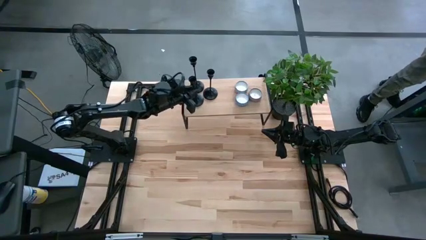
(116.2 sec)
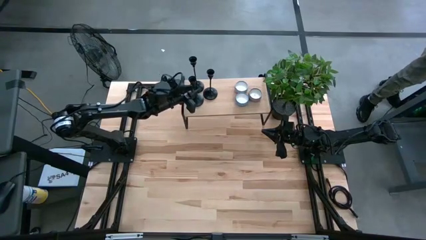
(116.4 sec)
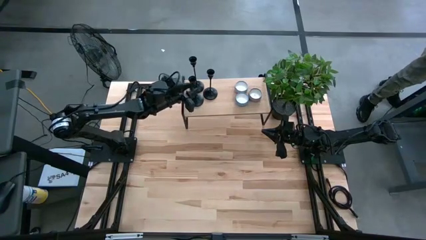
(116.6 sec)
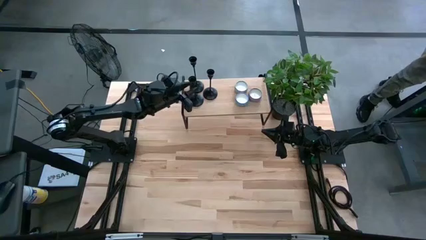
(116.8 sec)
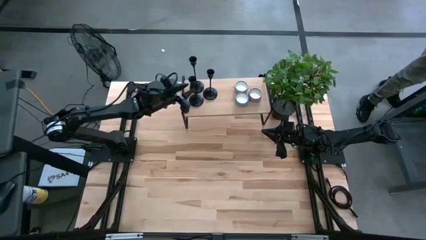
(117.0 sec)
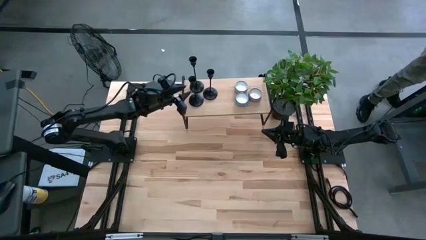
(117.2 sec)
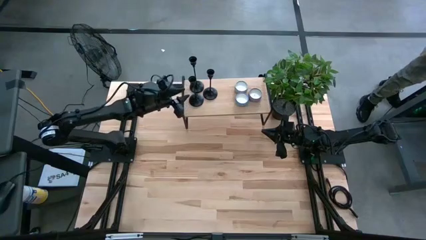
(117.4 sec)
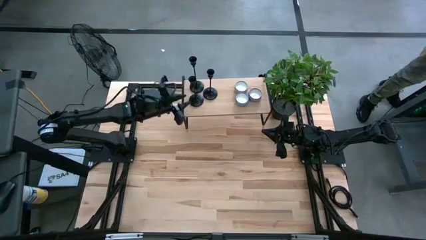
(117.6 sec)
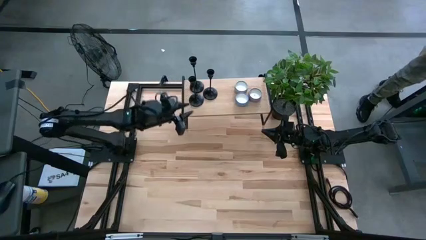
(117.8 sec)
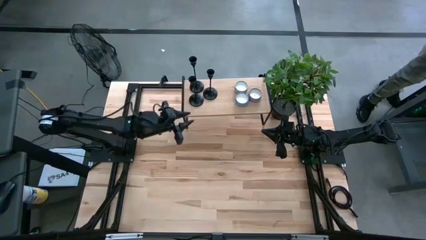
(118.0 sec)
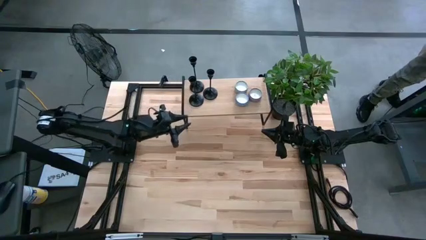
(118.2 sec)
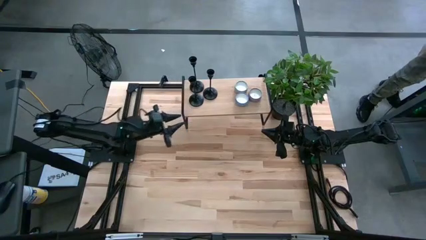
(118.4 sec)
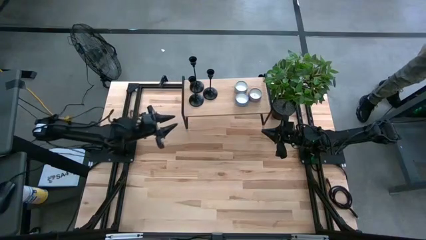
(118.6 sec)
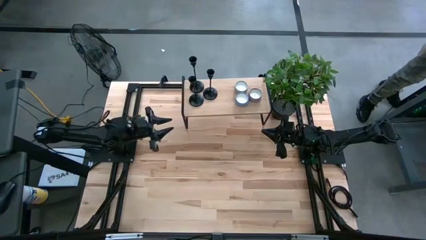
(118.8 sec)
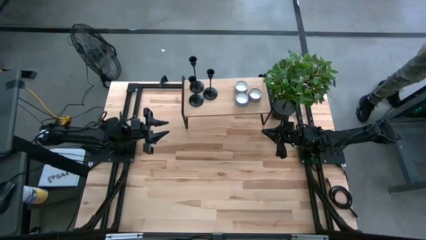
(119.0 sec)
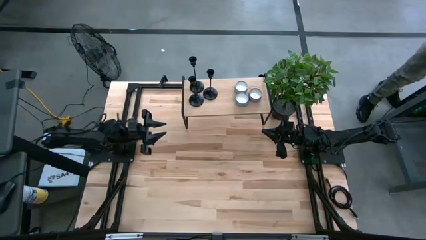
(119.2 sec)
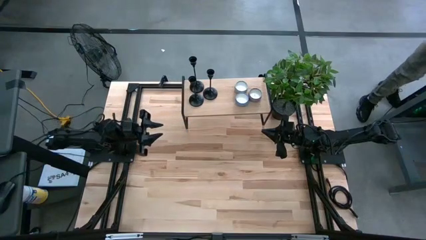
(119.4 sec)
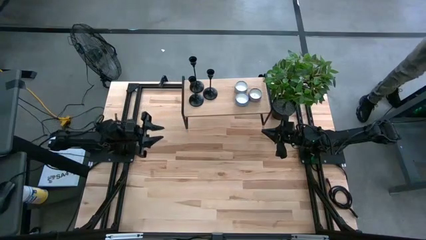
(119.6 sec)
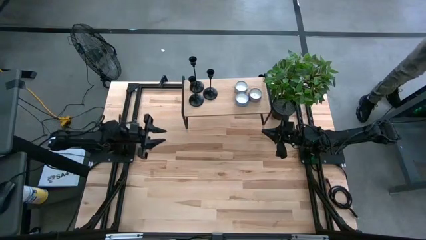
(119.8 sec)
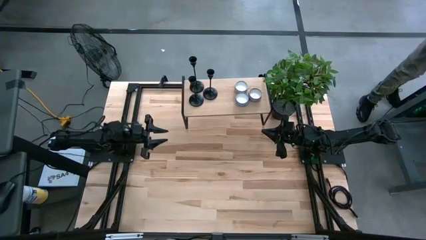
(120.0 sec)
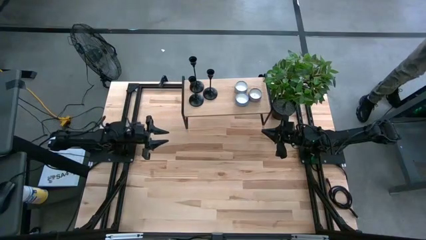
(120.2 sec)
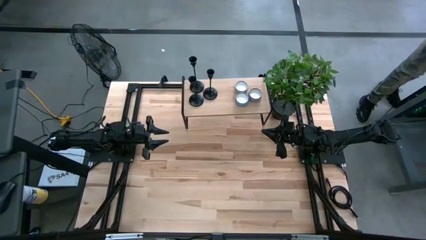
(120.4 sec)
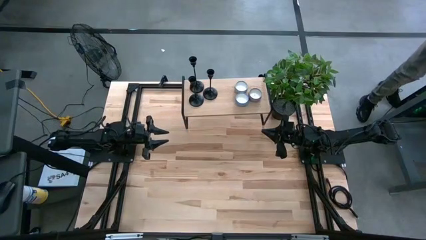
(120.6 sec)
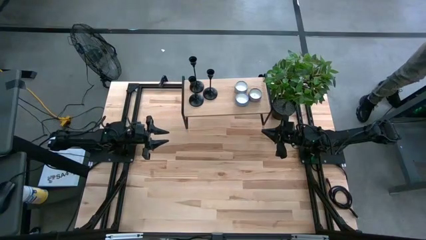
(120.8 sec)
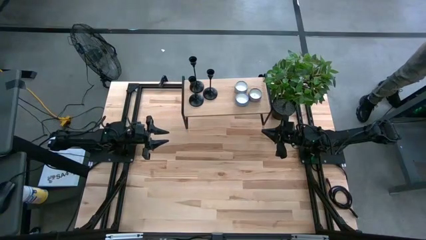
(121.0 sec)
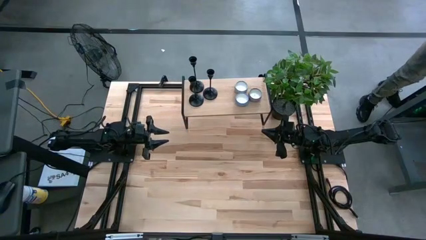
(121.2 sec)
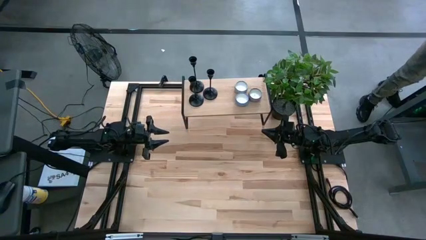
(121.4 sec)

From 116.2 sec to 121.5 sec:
Task: Pick & Place candle stick holders
Return to Home Position

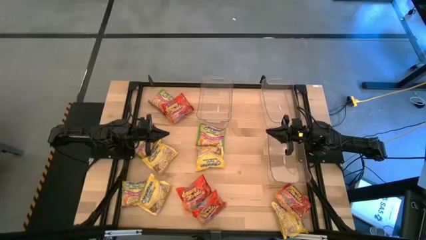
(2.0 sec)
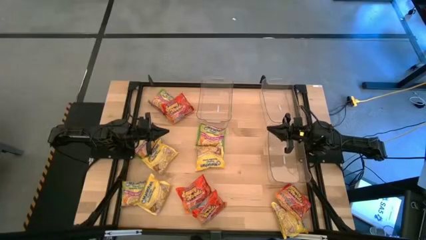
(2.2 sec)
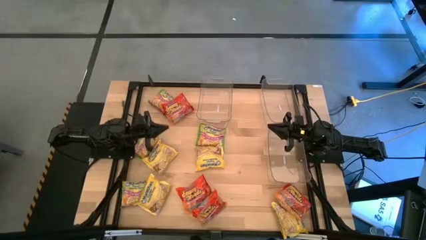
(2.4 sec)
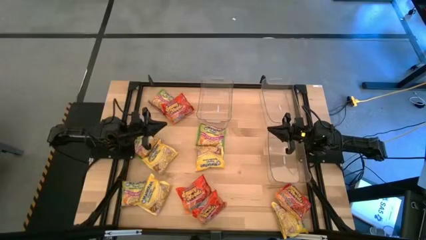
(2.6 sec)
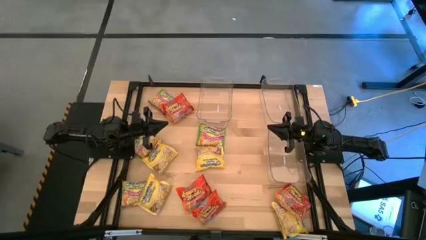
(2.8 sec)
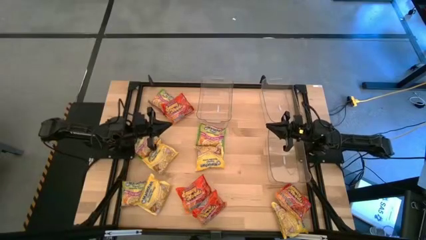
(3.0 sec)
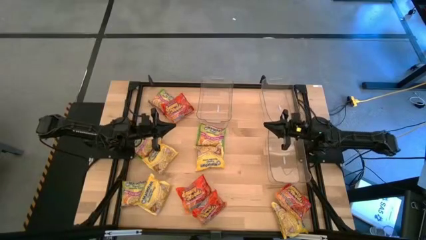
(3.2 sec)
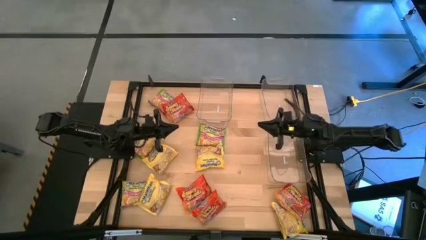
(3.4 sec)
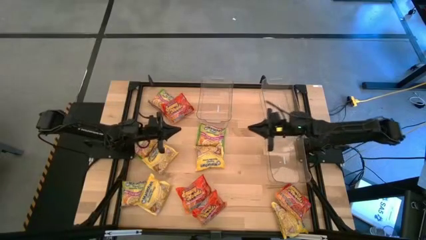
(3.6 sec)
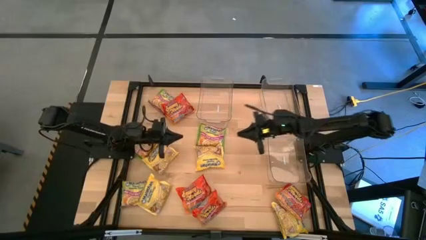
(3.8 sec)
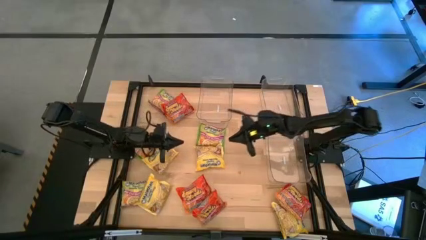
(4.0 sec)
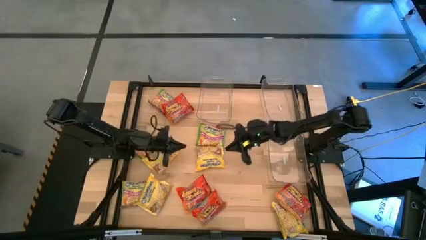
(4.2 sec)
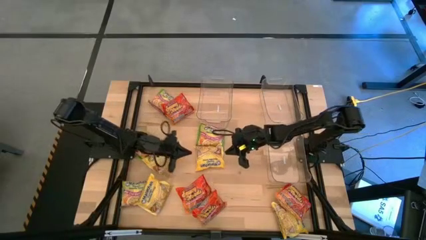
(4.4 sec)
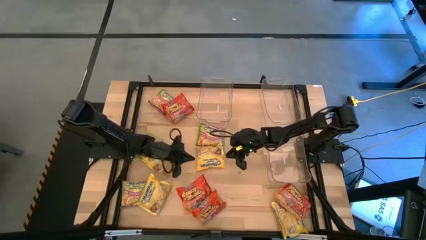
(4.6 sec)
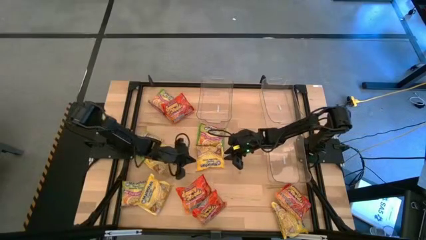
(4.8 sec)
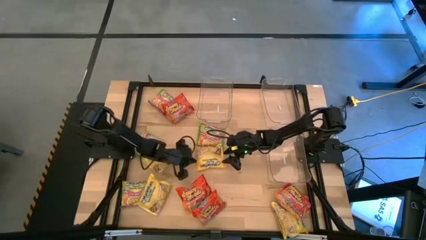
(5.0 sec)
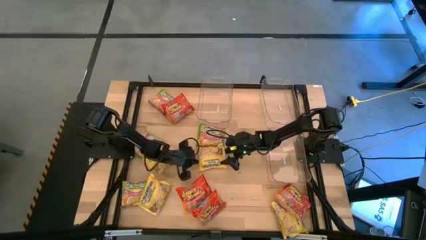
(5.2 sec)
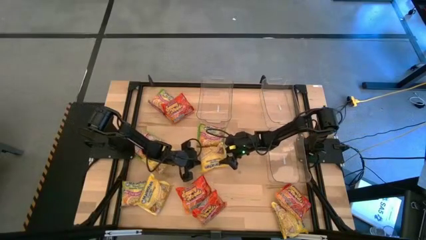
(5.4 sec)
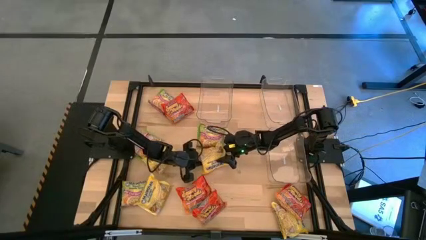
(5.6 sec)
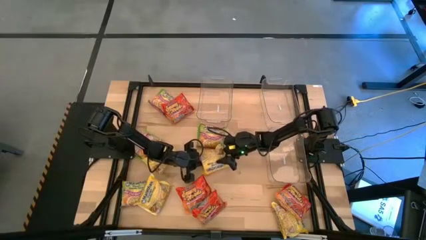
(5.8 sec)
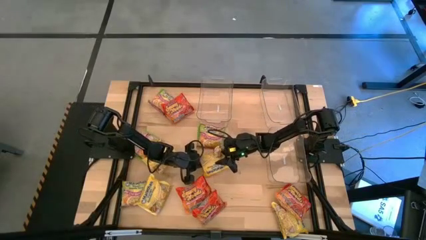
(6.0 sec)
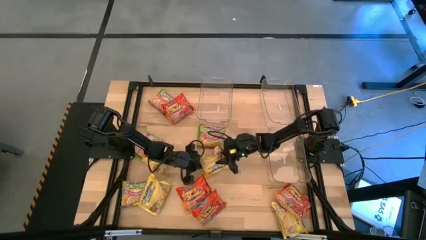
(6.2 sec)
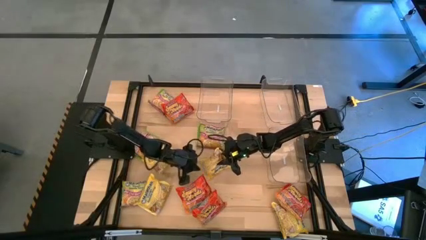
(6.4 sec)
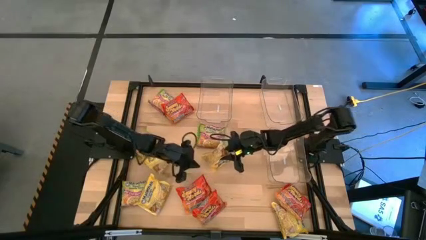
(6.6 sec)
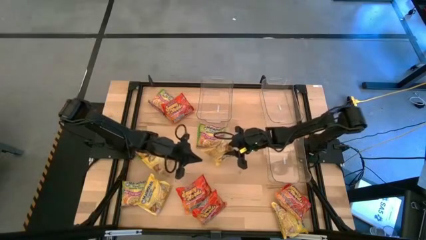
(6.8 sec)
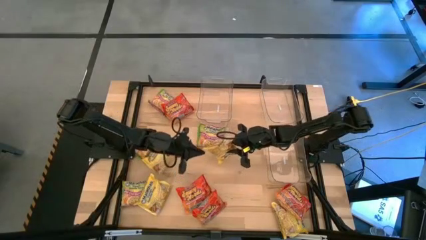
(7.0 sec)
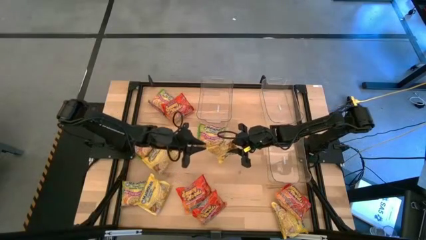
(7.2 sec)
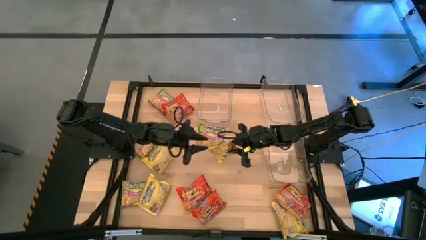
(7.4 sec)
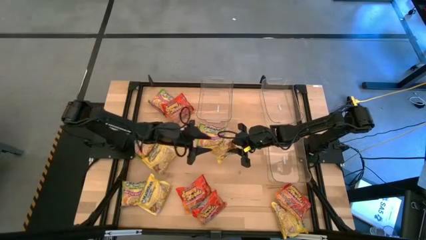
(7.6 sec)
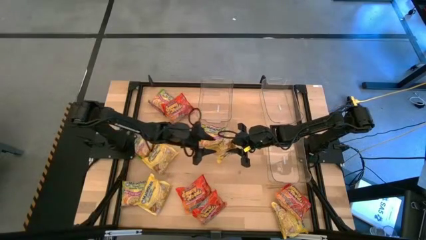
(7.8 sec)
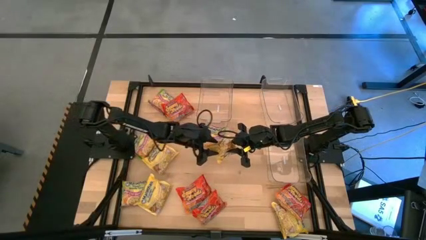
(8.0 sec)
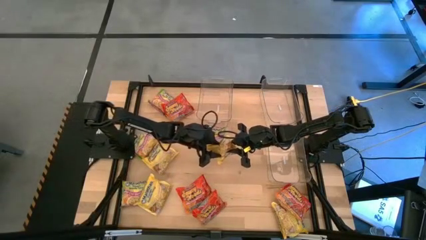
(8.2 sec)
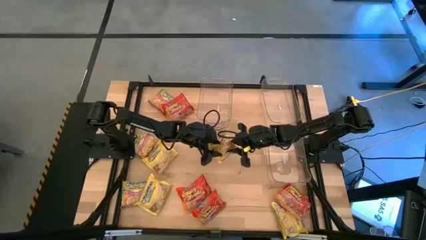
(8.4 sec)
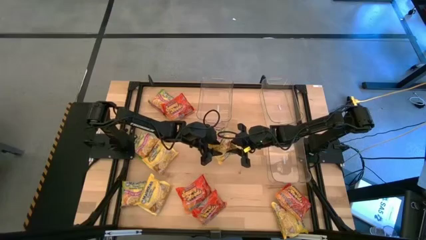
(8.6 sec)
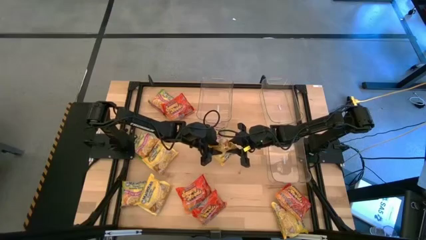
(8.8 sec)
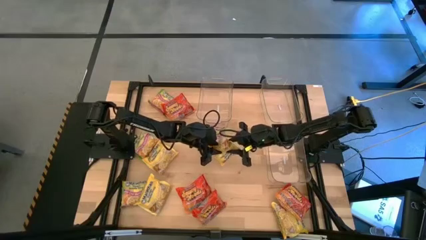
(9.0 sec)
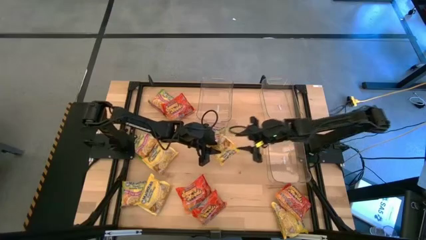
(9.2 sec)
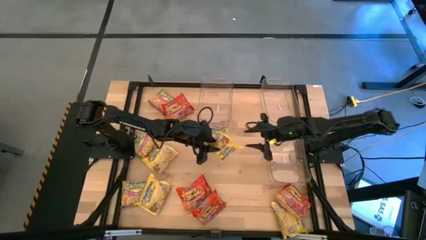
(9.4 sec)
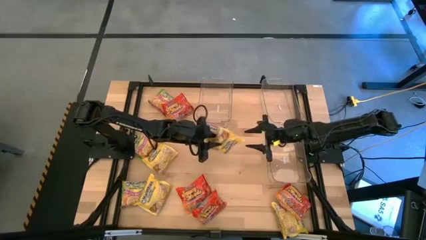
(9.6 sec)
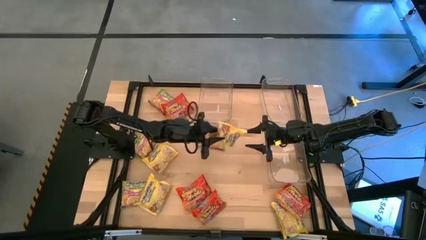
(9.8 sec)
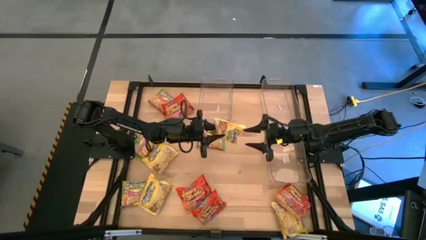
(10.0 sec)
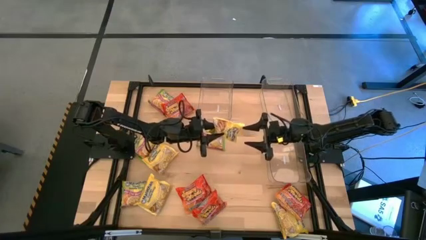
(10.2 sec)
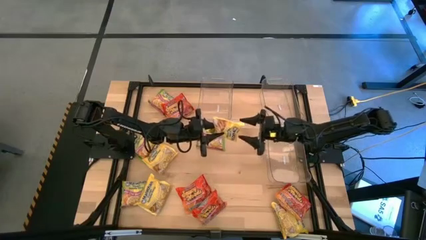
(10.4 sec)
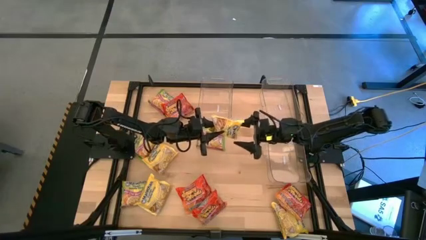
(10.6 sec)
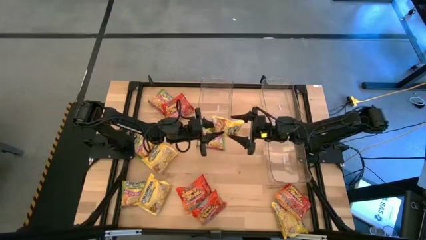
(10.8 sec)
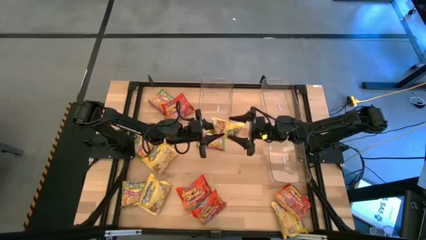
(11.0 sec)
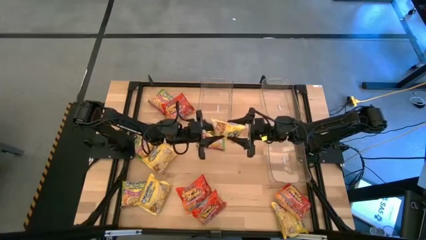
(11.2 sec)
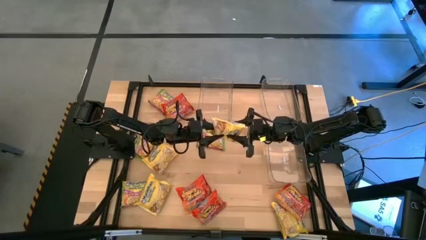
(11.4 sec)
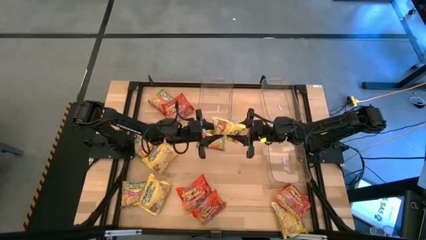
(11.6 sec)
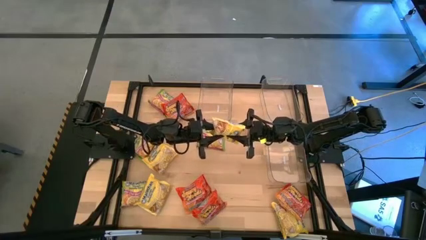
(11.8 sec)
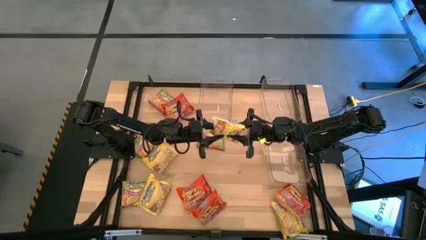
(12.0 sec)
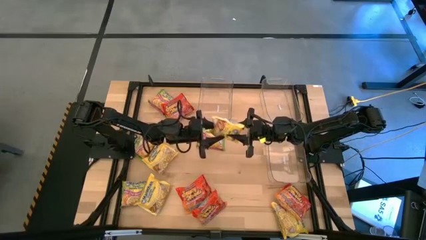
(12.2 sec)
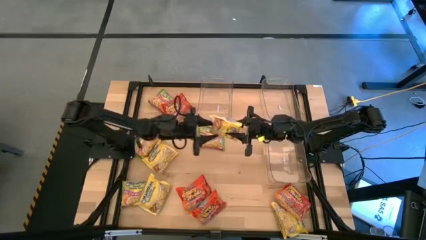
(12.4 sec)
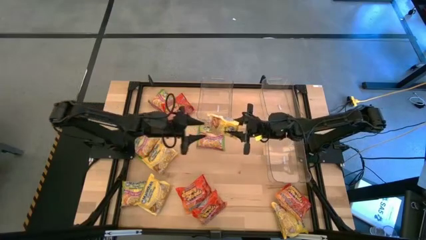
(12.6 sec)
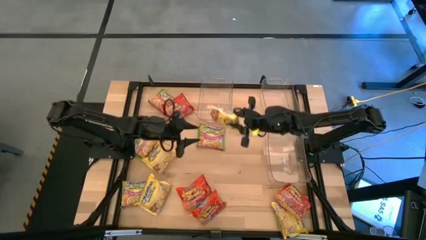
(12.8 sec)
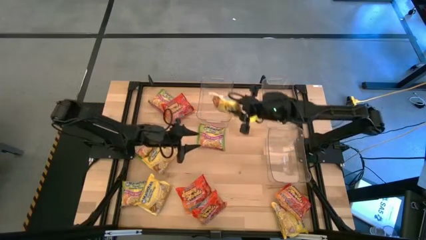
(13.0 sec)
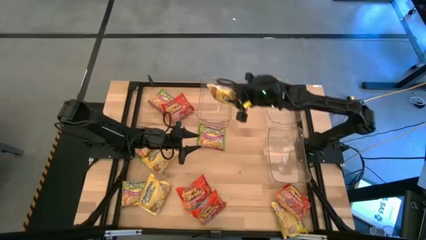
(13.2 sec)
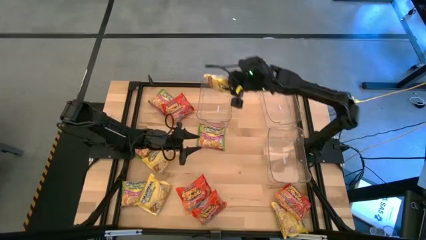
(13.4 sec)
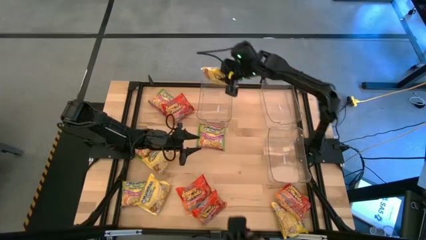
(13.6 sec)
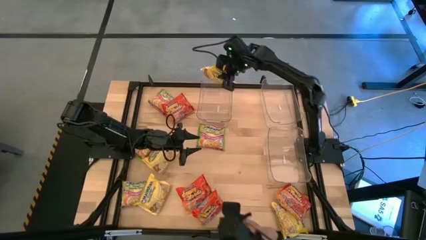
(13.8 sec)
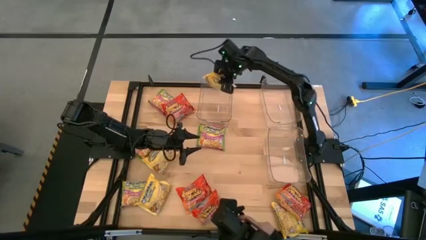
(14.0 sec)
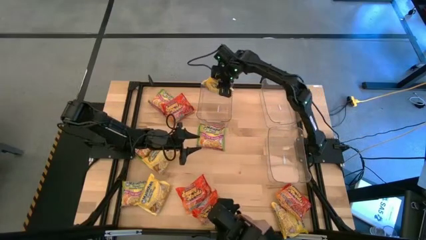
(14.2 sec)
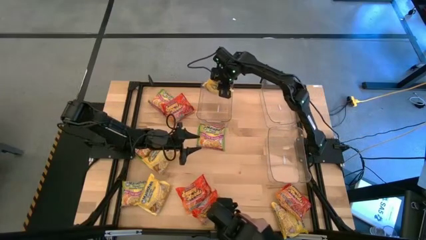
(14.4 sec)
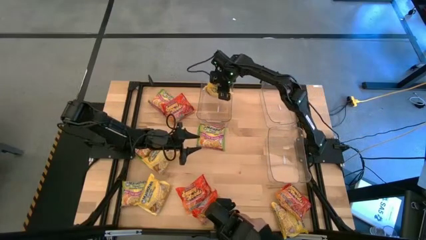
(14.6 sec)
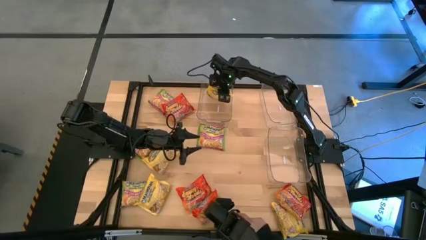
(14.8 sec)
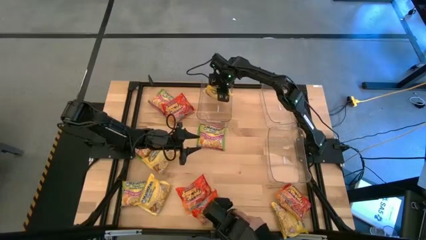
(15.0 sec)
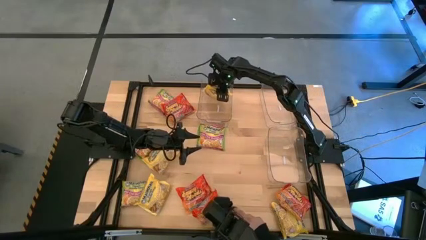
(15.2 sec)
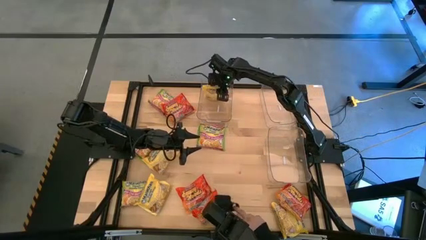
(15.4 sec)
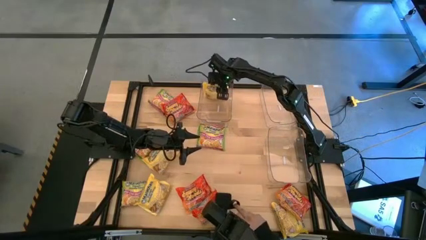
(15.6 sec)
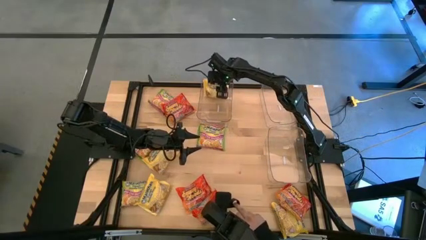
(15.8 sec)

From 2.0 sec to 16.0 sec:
Task: Sort Maruchan noodles
Put the yellow noodle pack into the top left transparent bin
